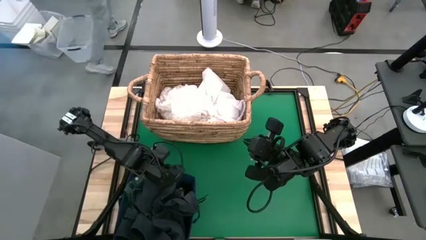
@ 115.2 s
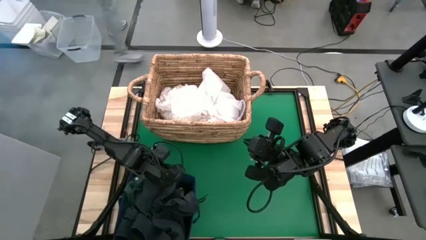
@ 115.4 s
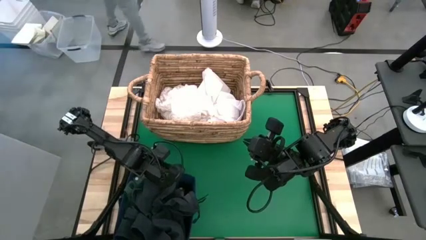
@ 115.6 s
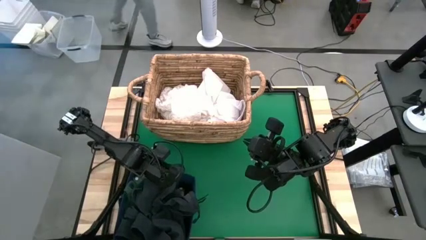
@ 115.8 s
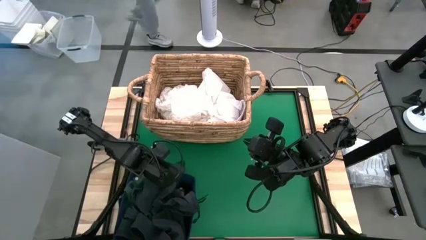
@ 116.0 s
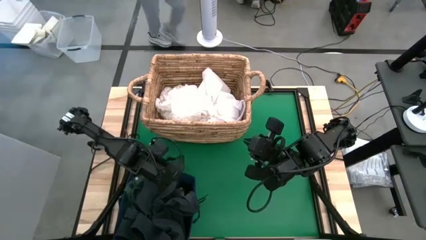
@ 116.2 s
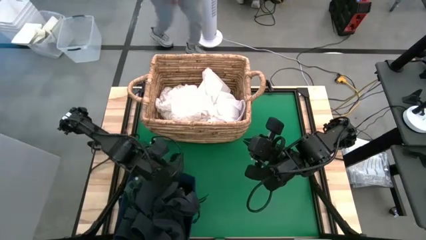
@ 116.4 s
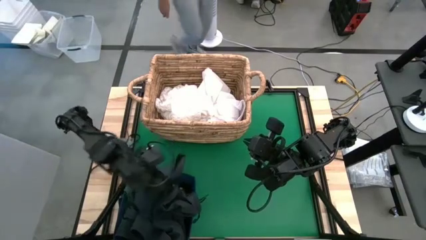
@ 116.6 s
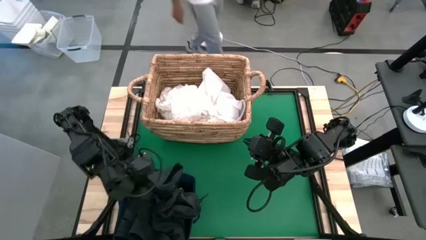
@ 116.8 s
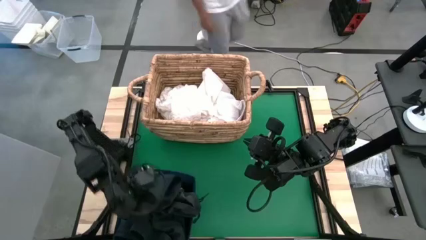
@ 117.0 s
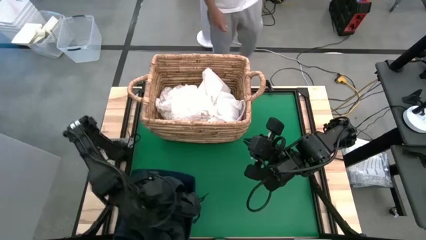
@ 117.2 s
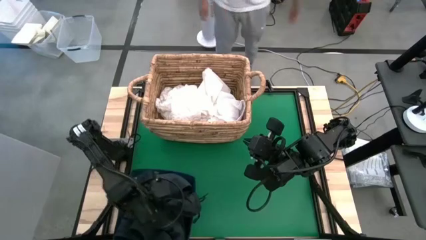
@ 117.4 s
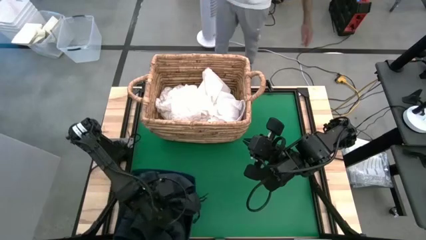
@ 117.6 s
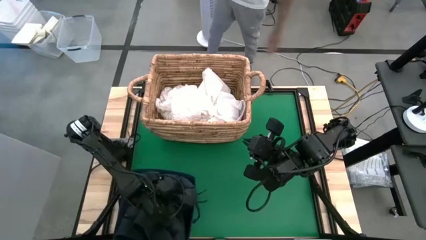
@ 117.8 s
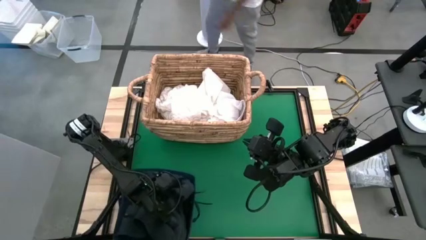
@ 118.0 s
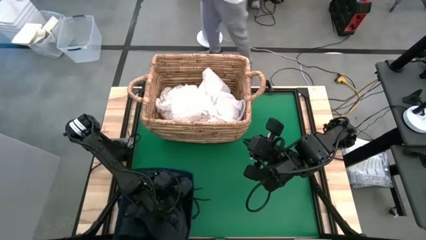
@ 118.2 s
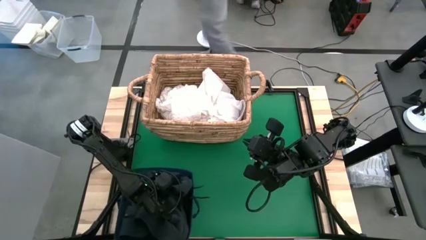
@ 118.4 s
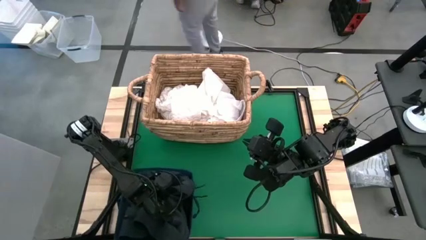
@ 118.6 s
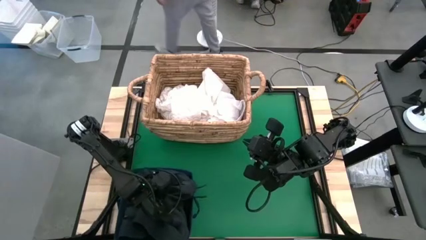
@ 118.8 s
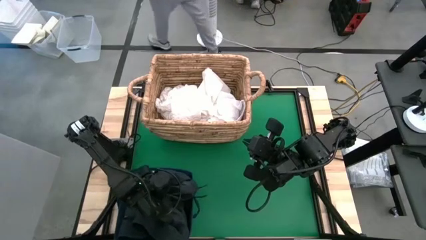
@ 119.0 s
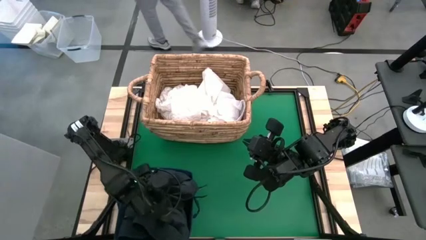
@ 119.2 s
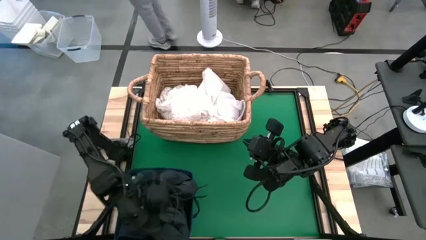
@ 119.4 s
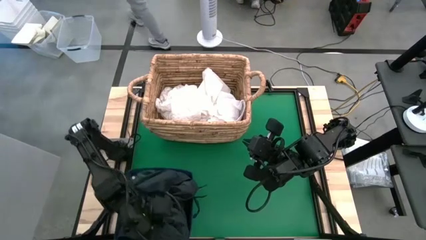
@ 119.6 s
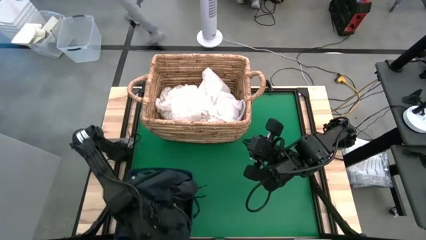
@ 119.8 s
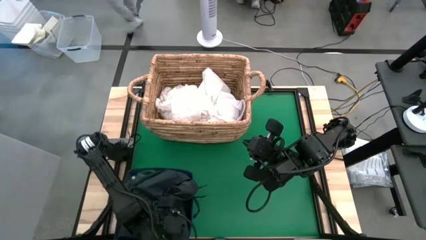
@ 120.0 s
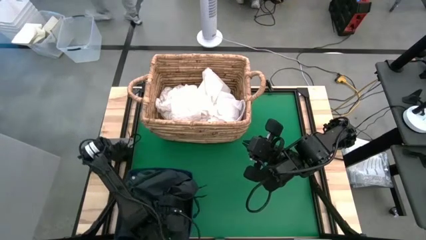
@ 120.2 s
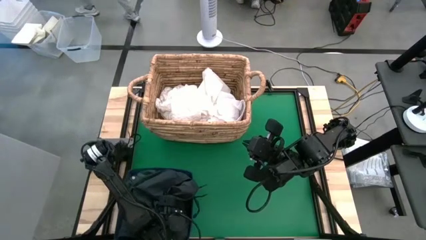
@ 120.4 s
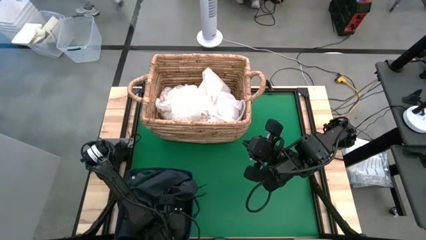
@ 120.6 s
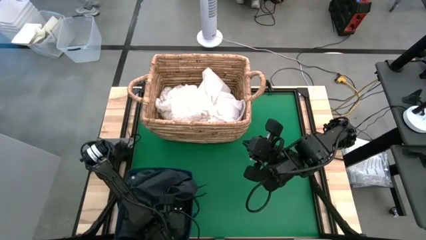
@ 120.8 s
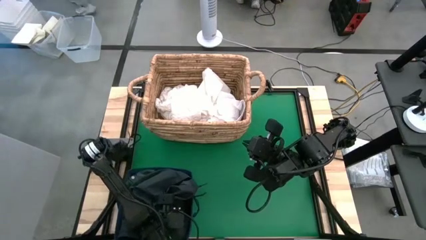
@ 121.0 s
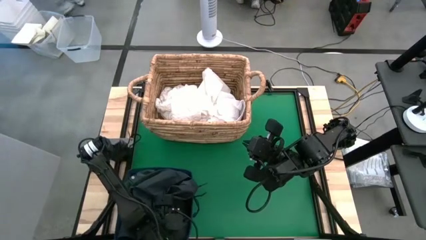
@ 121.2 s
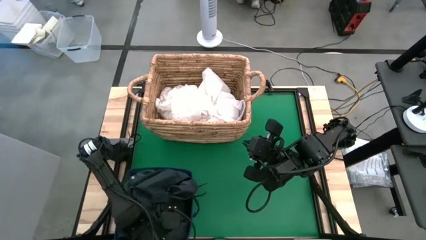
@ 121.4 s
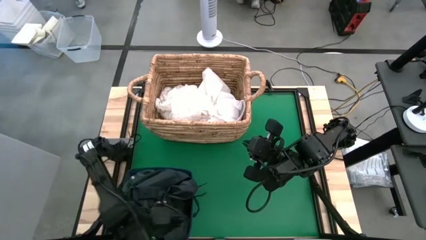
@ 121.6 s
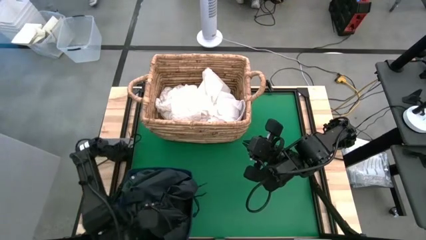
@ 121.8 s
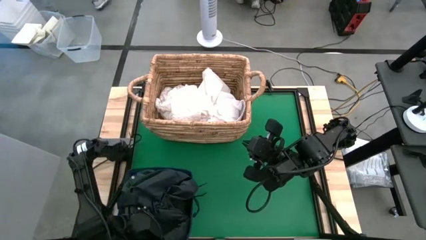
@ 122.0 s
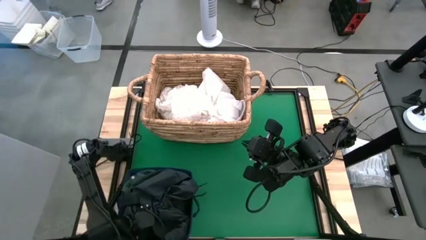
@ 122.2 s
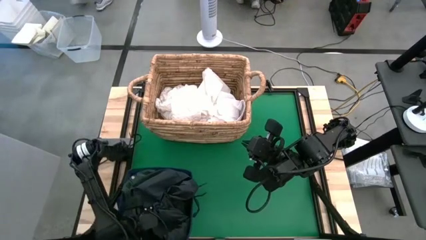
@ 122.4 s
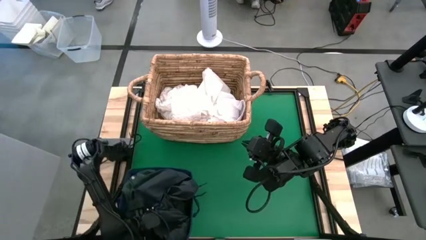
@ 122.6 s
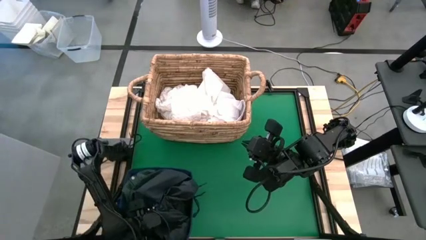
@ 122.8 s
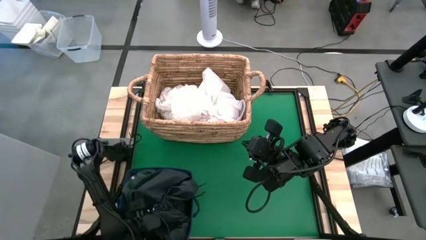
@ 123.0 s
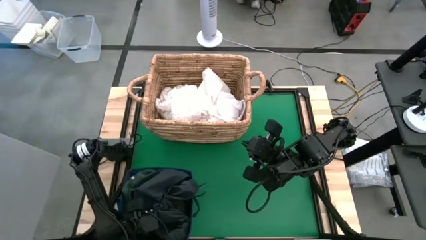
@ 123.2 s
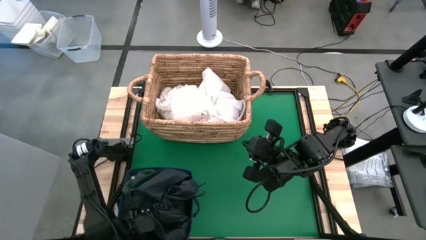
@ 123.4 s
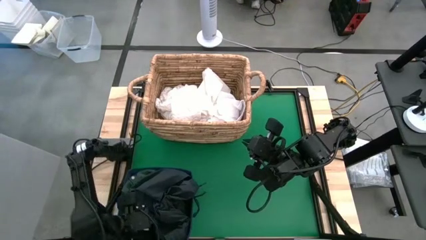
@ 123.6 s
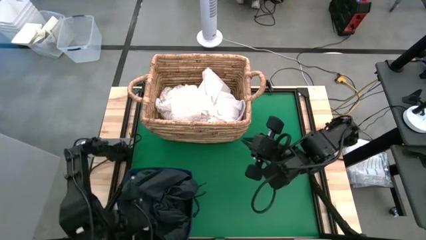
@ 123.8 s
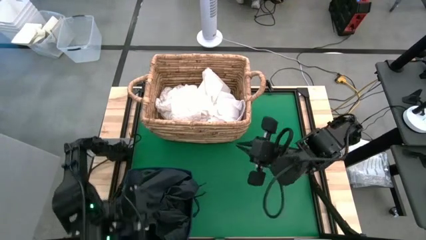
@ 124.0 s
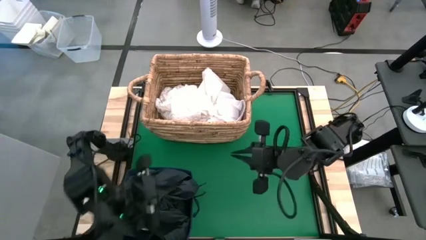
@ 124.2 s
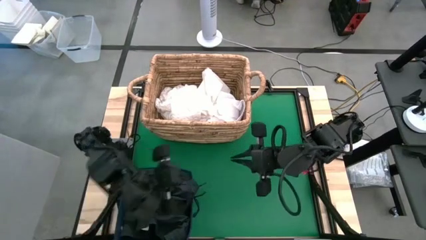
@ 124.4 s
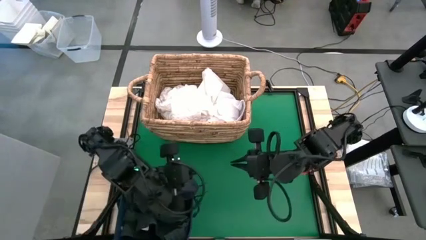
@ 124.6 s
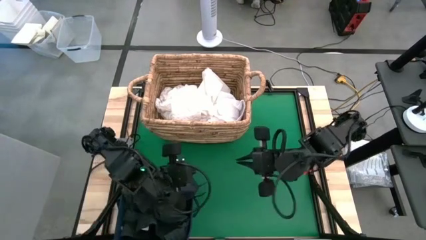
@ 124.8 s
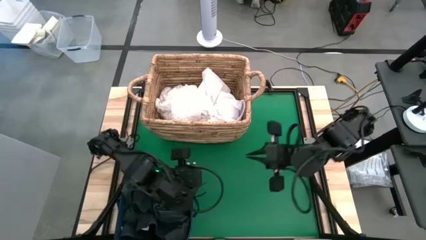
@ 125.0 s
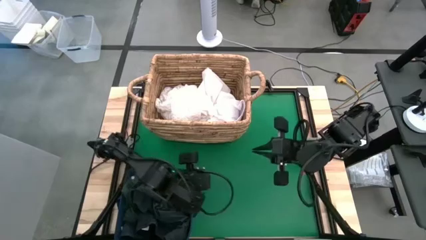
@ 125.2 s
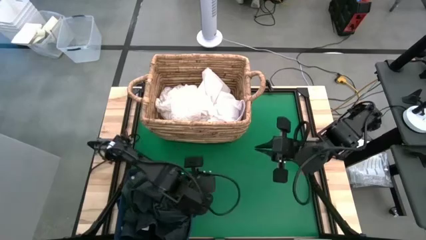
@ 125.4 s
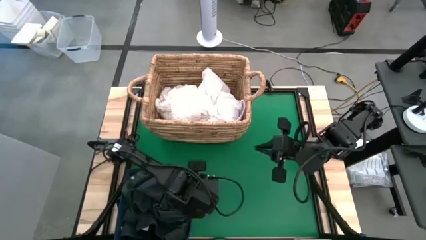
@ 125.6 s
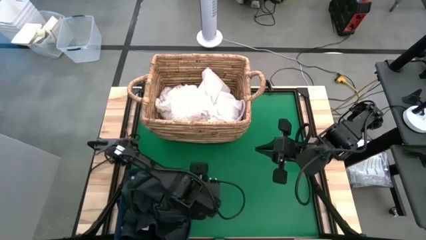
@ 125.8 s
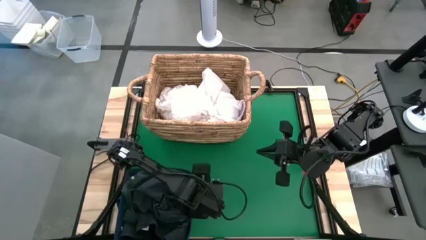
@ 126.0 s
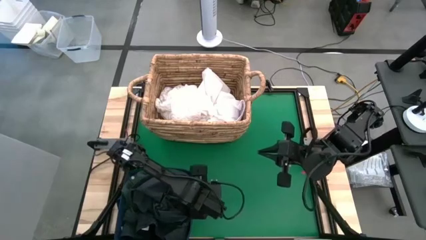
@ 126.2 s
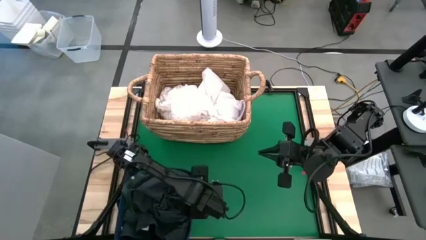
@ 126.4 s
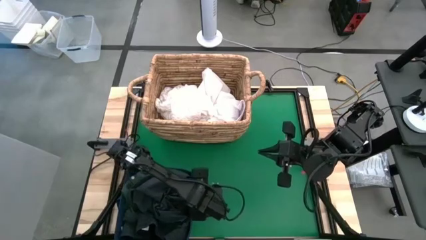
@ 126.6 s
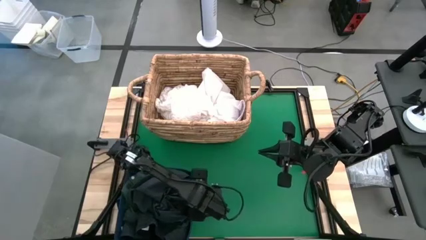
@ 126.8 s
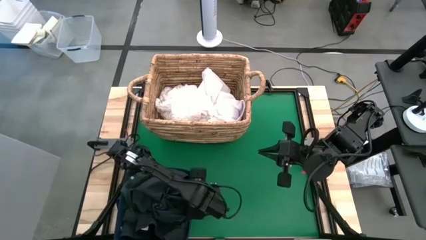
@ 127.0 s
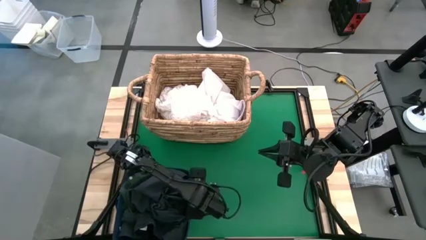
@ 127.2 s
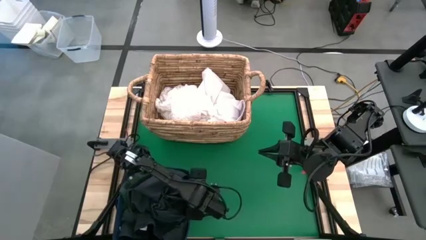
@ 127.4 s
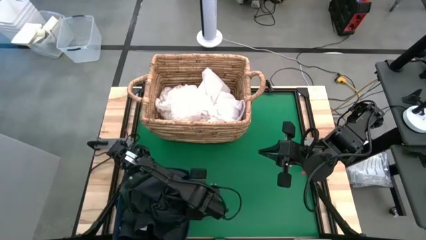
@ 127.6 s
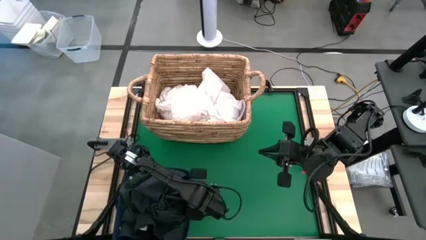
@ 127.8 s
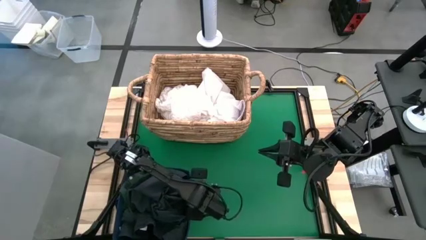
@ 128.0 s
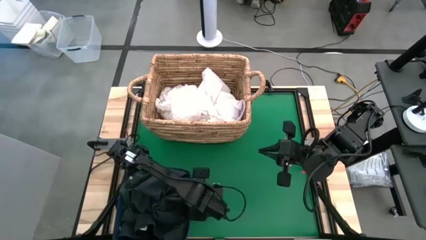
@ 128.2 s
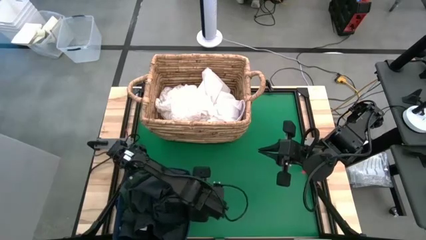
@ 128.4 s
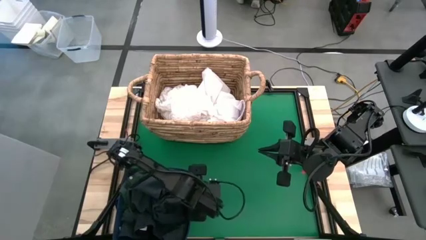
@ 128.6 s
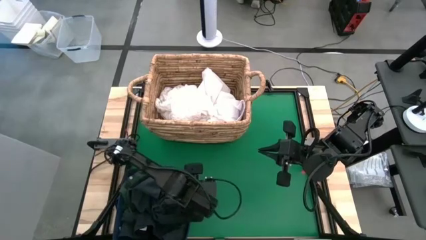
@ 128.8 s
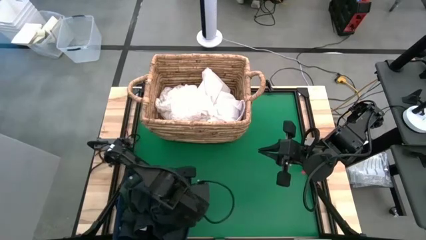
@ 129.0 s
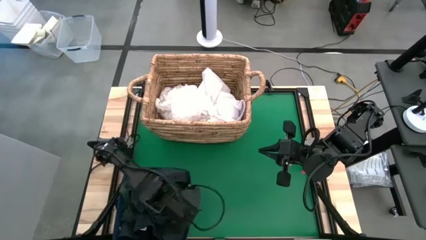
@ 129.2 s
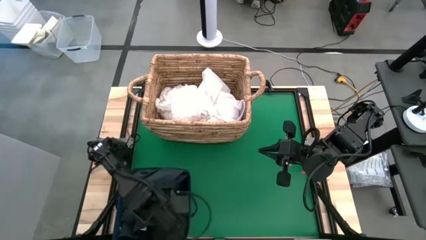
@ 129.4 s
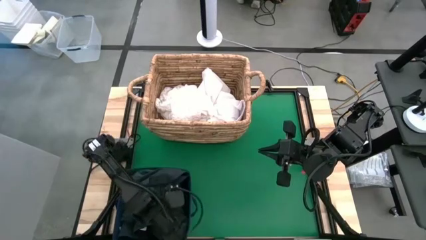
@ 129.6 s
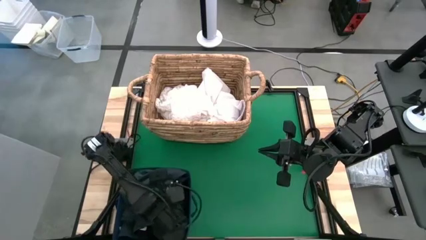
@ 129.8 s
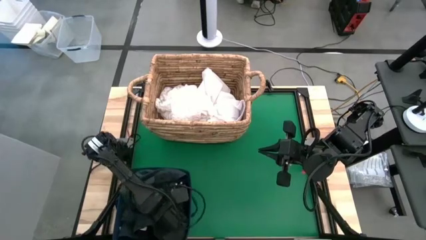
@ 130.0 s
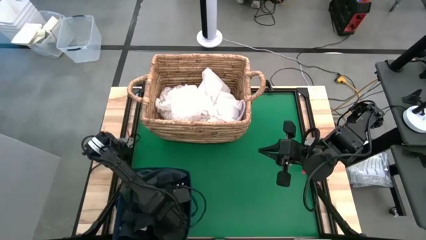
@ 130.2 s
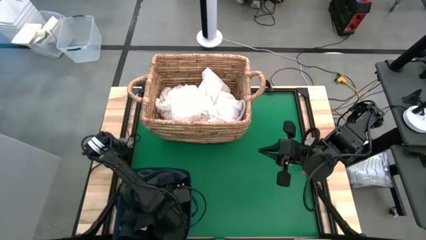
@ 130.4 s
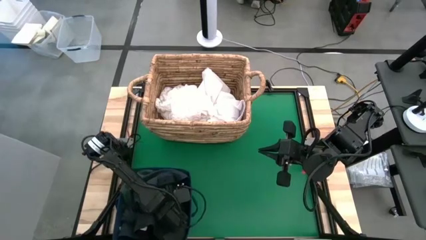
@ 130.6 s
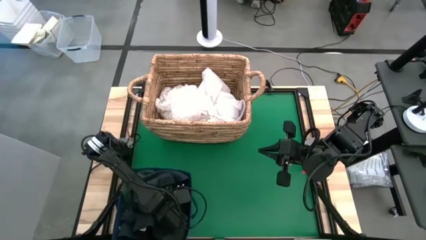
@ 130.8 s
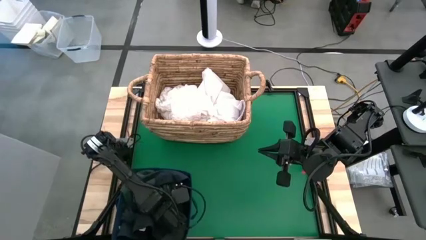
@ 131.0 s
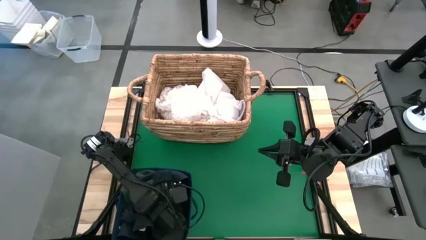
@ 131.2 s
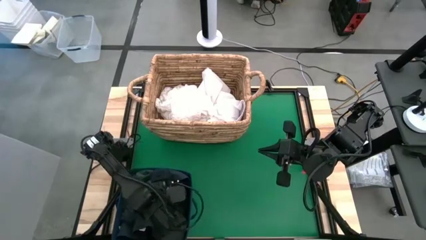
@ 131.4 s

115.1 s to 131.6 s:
Put the black shorts into the laundry bin
